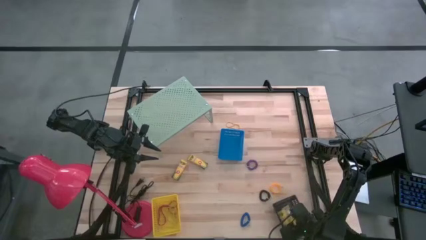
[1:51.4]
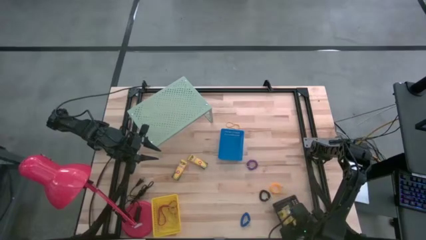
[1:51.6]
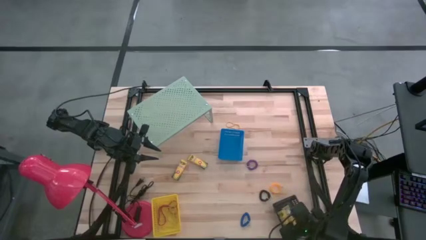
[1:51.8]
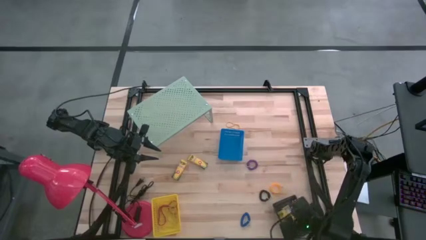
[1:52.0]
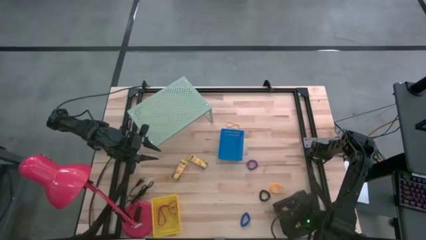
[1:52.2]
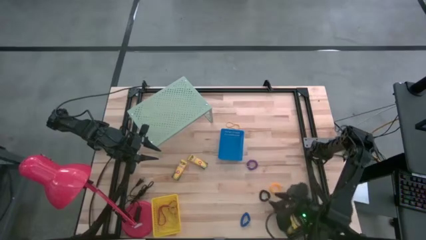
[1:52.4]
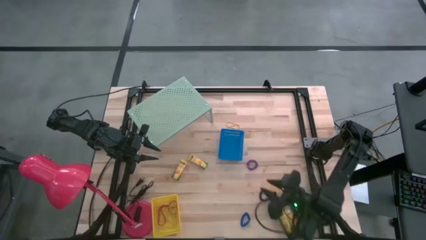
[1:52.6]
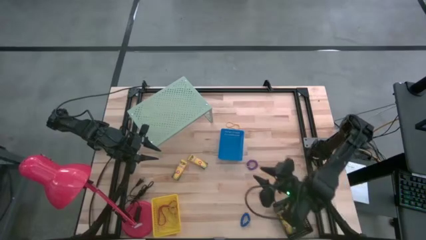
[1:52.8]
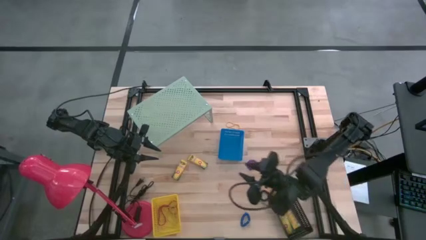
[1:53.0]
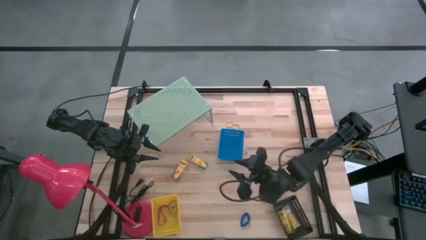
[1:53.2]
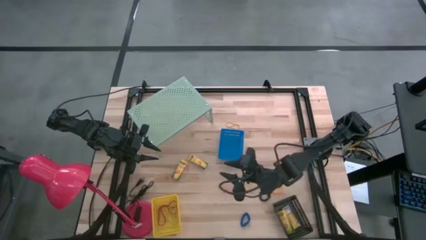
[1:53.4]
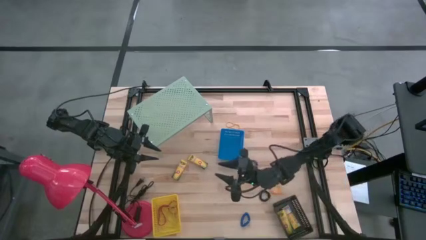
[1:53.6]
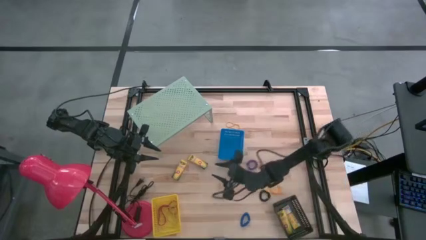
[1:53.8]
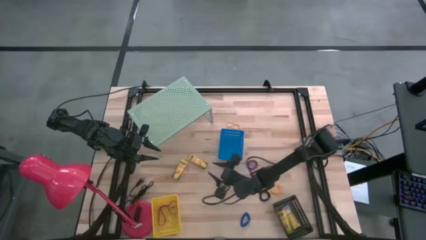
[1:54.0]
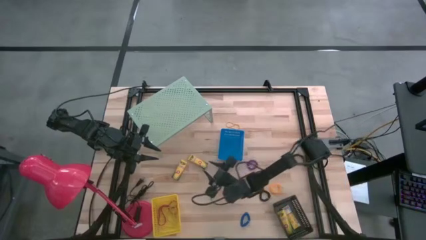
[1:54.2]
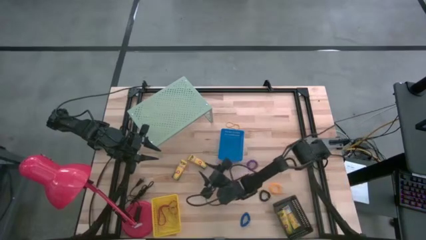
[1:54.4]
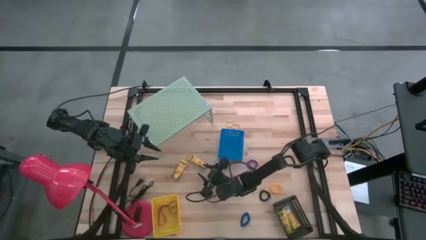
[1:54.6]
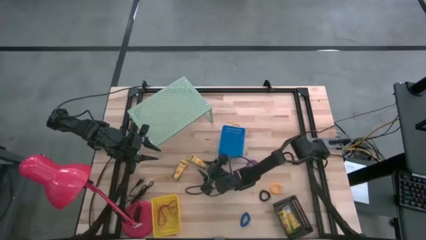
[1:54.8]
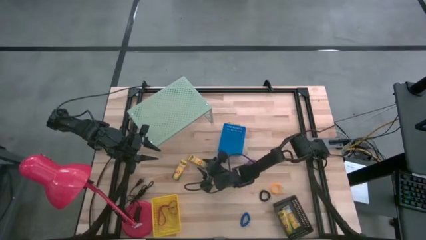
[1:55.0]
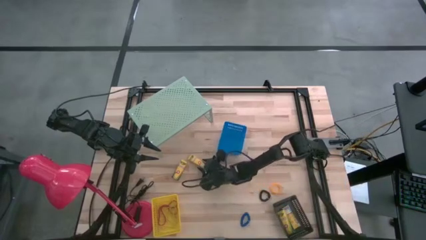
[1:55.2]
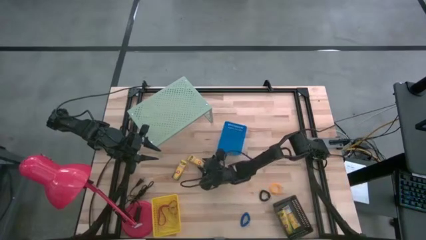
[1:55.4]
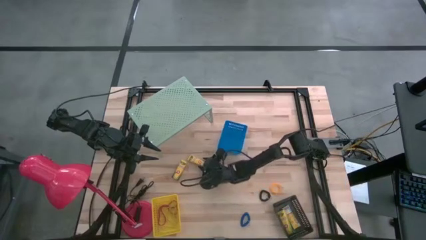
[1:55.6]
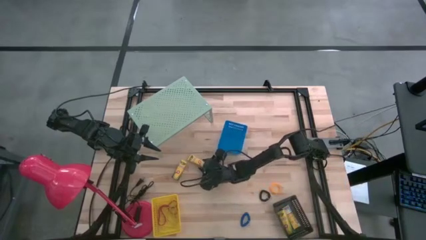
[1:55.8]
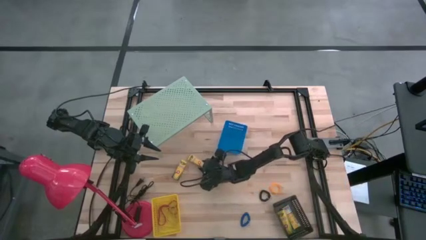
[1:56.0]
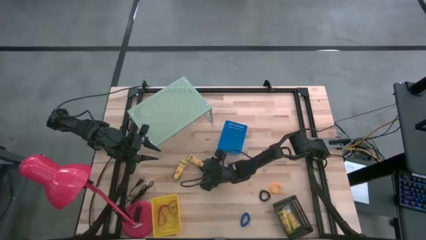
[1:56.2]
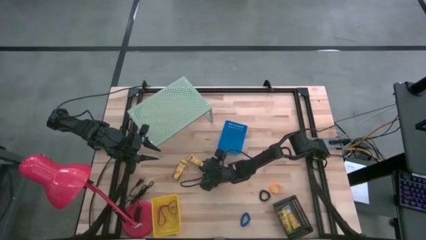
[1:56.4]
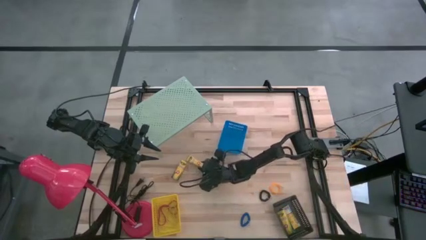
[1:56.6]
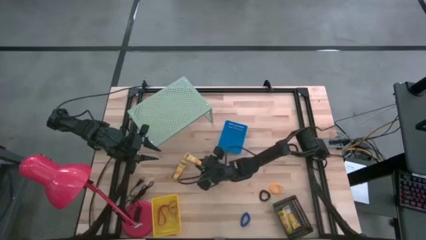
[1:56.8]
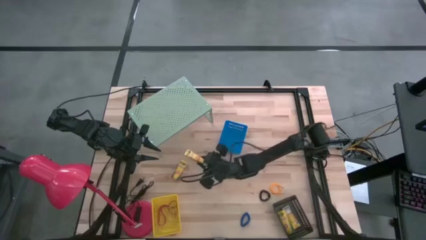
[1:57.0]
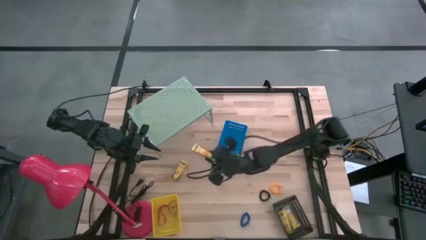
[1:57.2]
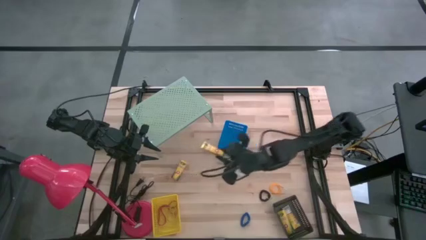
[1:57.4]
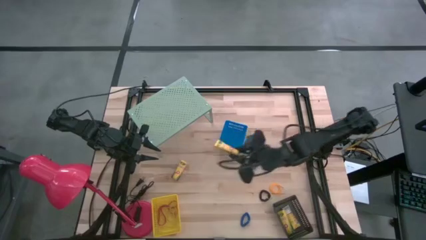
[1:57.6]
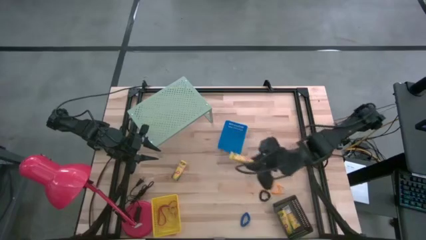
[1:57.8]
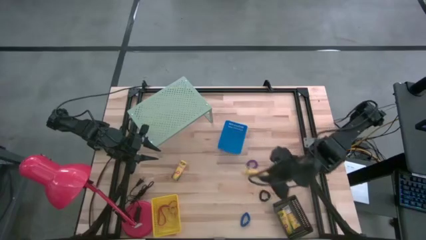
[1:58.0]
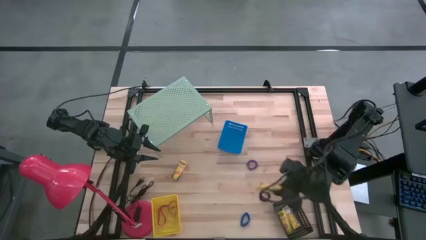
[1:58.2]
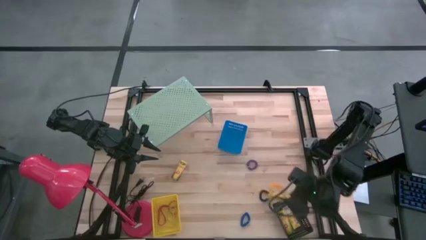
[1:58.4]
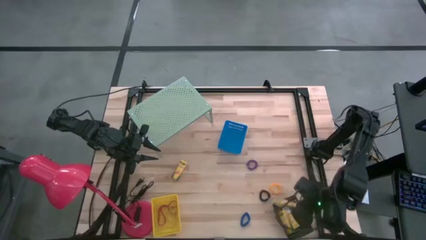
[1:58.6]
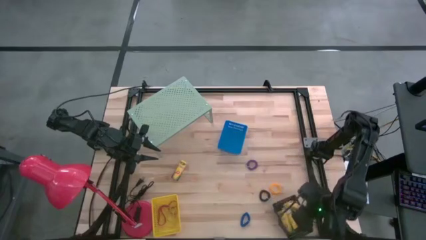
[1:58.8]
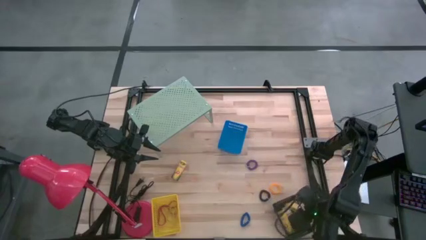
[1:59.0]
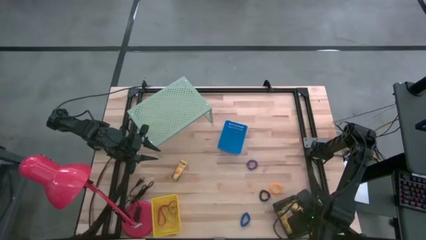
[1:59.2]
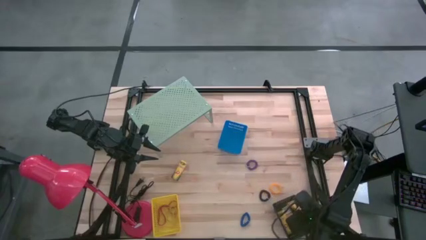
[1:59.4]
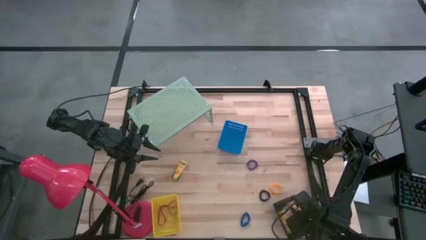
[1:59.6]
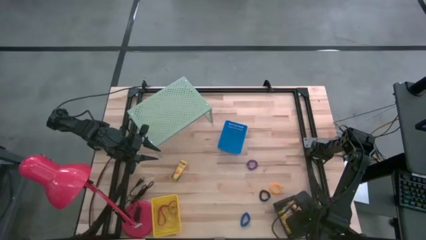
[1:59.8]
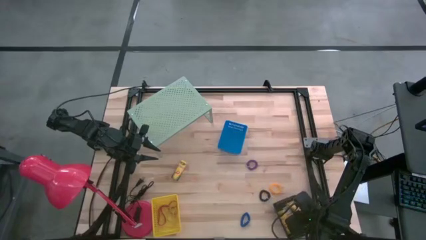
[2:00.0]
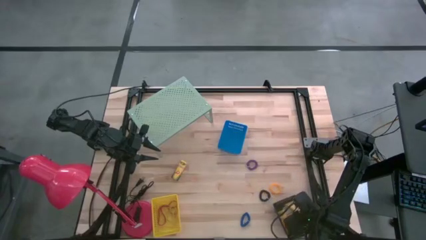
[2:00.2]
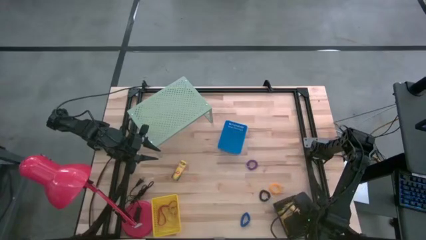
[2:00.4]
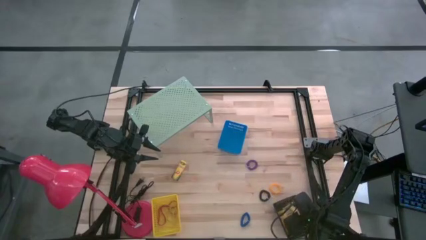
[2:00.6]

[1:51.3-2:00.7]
Task: Pick & Place Office Desk Supplies
Put the crayon box into the black basket

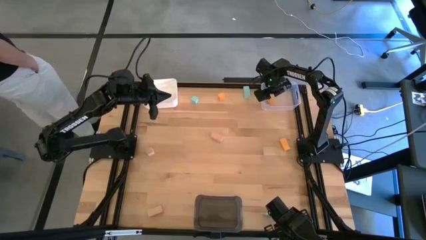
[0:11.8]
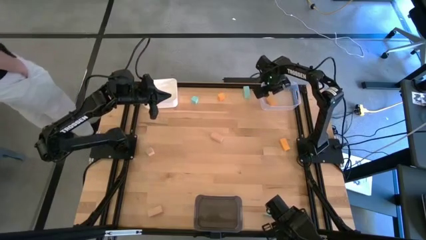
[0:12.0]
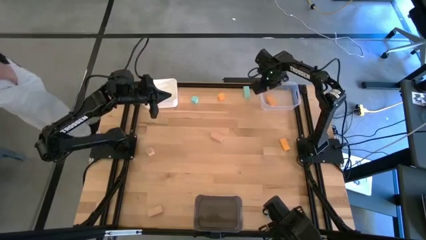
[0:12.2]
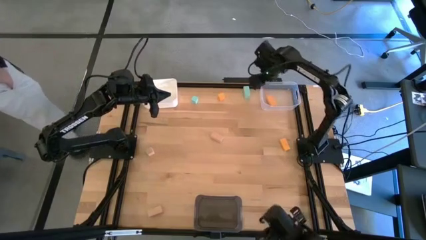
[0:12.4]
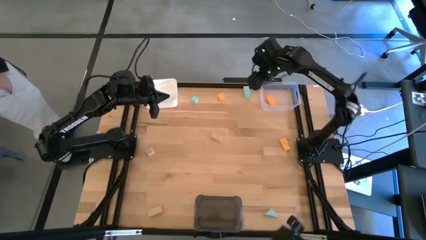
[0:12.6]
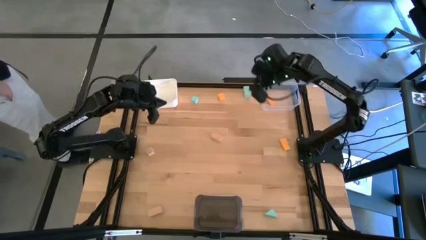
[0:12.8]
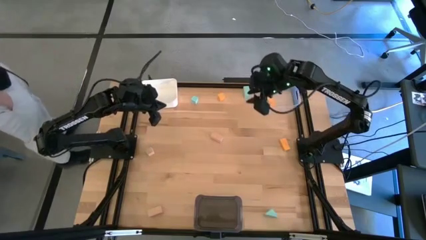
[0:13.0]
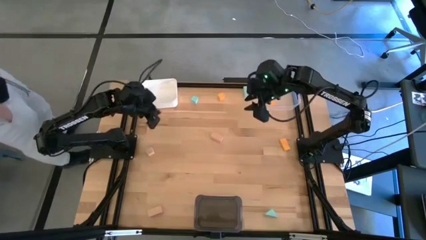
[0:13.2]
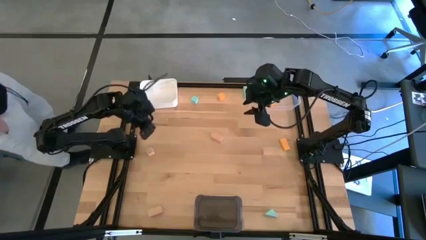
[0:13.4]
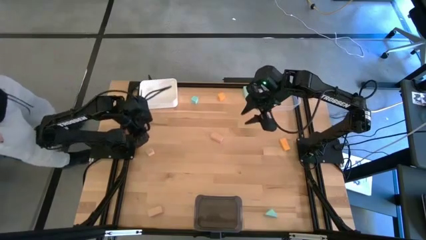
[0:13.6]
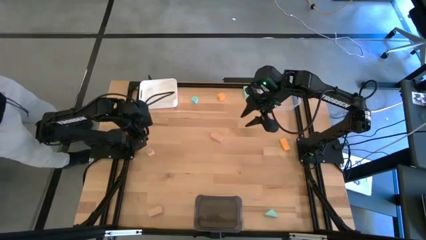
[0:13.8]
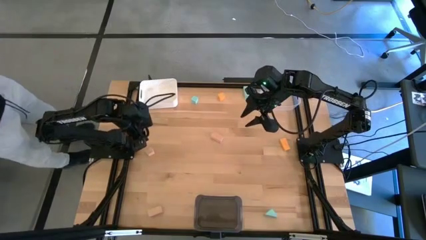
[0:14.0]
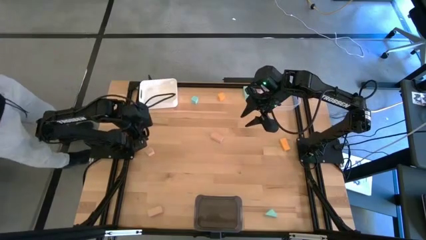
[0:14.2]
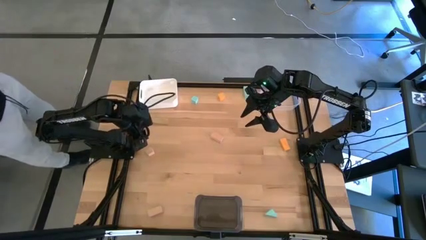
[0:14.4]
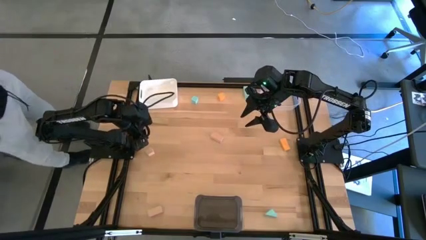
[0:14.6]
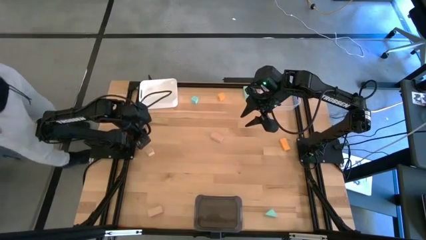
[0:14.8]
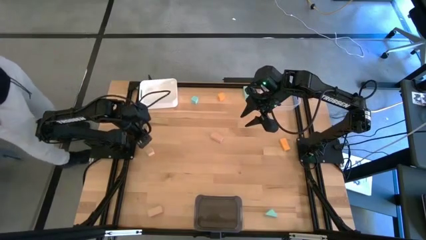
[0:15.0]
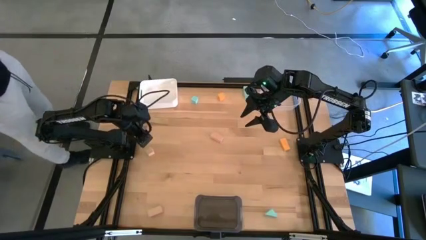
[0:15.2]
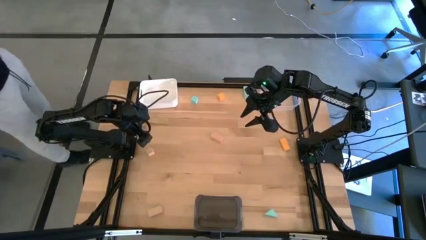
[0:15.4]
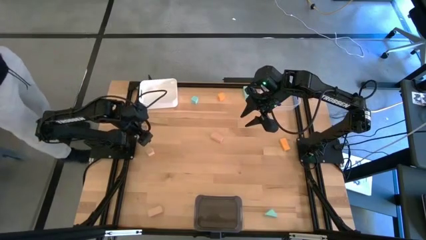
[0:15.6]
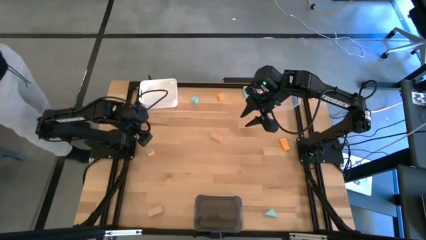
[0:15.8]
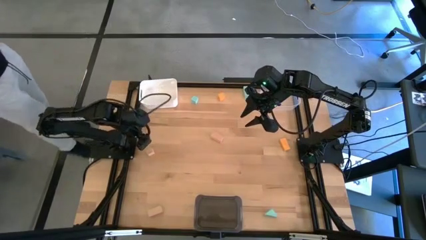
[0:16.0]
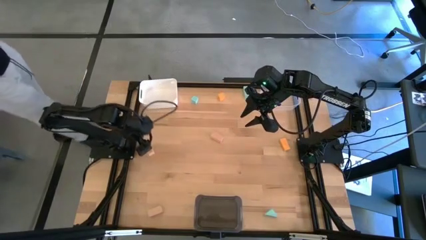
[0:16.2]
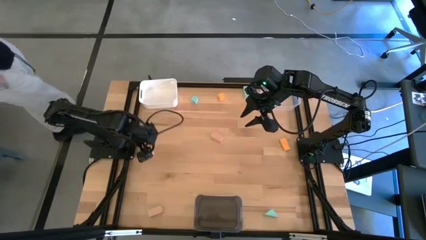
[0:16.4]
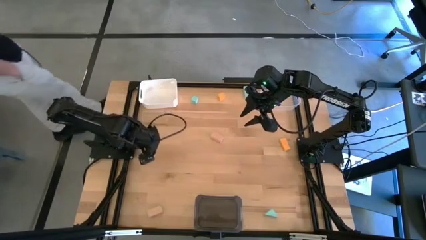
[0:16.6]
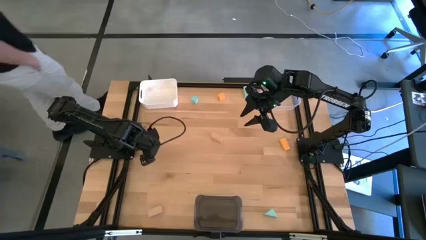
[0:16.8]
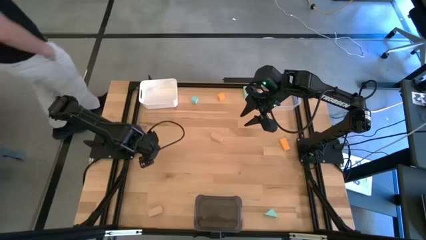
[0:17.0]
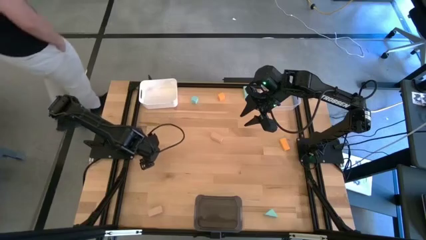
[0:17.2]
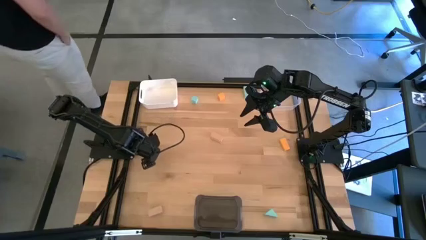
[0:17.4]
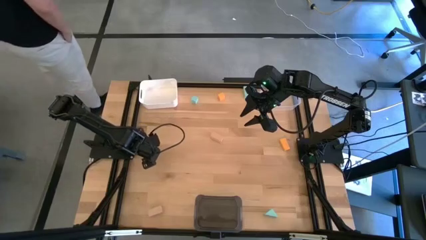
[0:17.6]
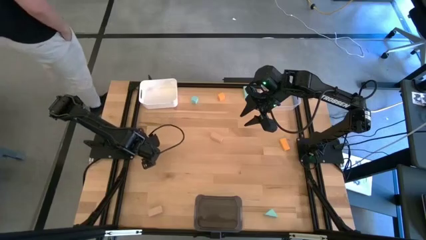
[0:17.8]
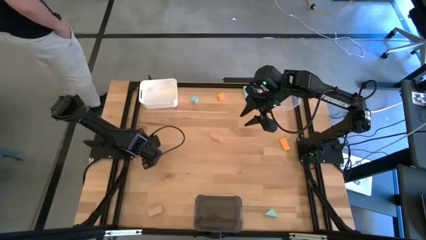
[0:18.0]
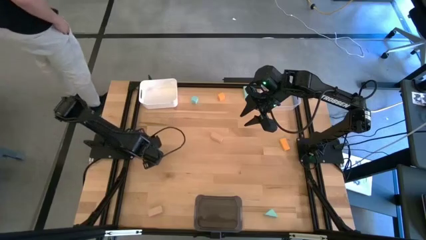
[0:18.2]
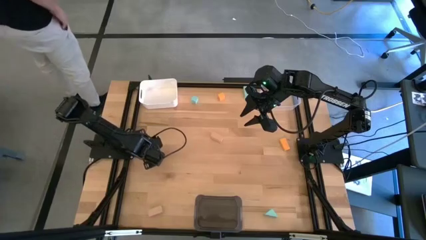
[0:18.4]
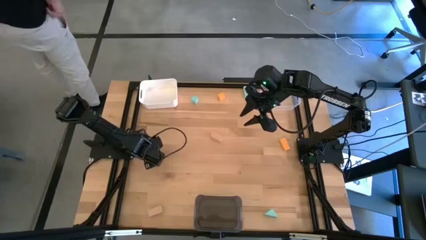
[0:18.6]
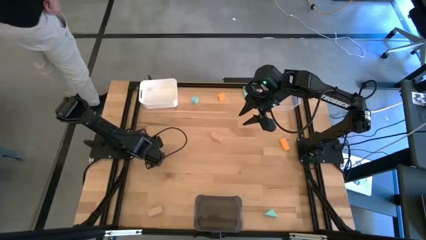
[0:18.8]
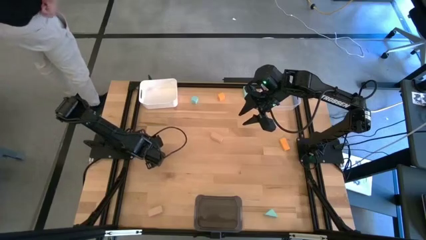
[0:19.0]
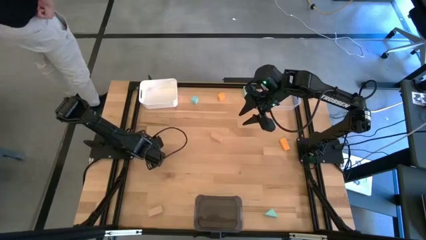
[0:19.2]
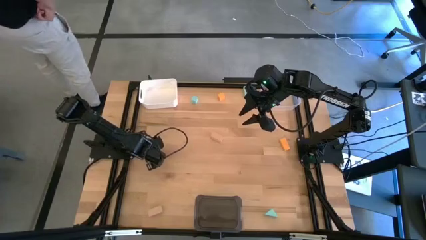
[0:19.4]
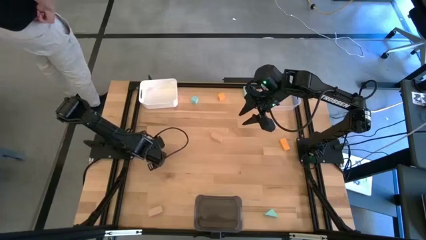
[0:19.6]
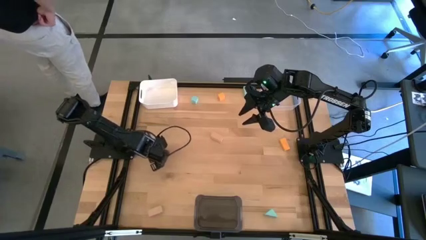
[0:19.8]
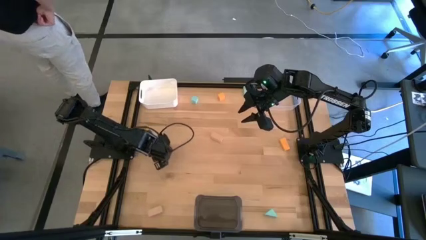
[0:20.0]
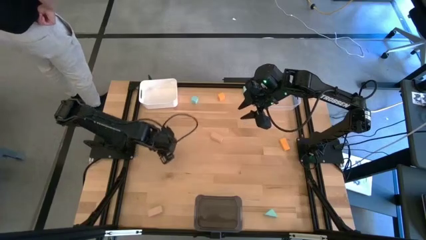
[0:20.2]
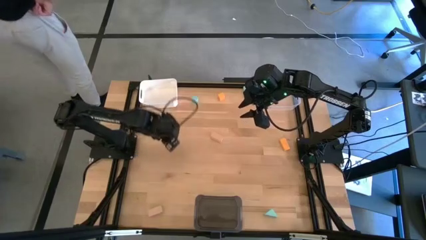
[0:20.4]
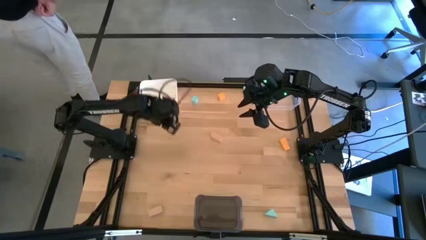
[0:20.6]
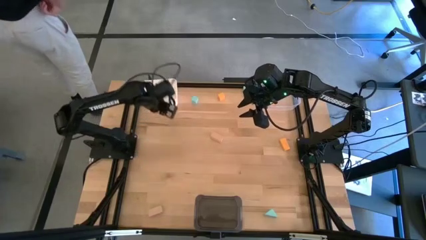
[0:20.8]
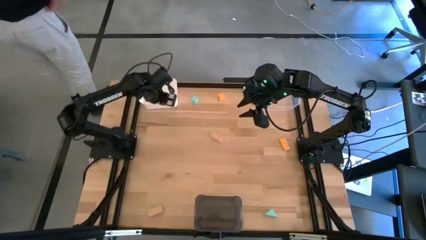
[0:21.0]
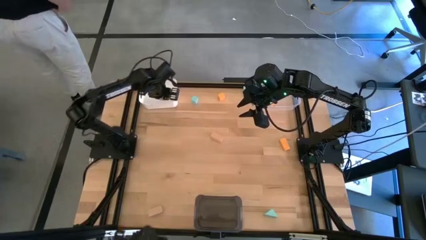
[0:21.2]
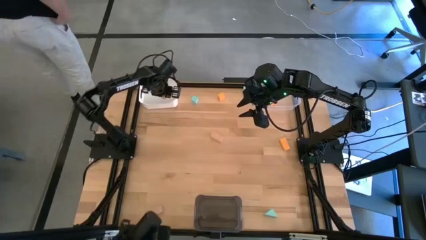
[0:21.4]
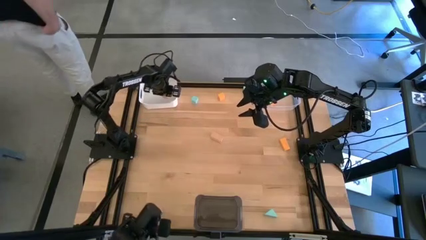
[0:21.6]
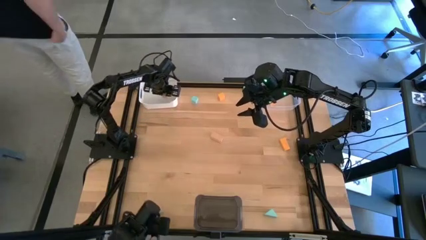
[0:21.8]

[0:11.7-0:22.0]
Task: Sort & place blocks by color
Put the top left brown block into the white bin
